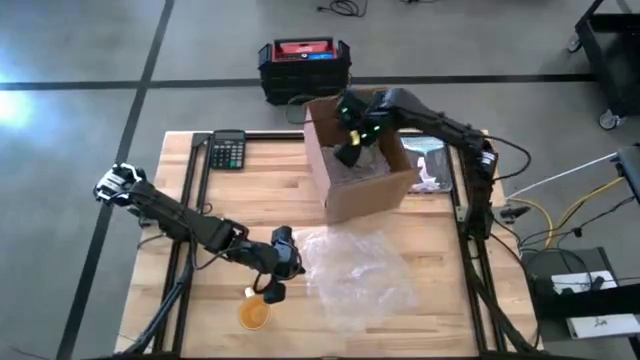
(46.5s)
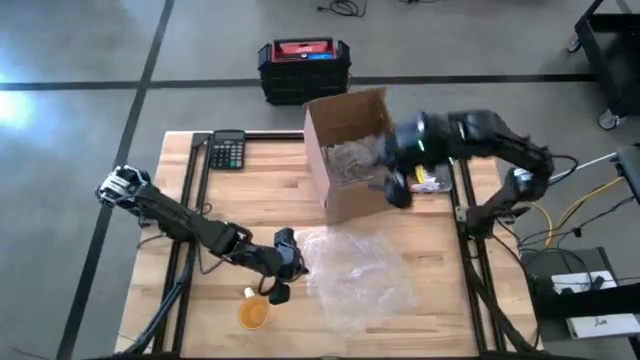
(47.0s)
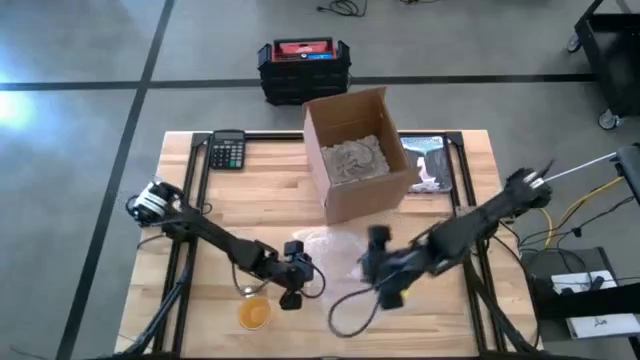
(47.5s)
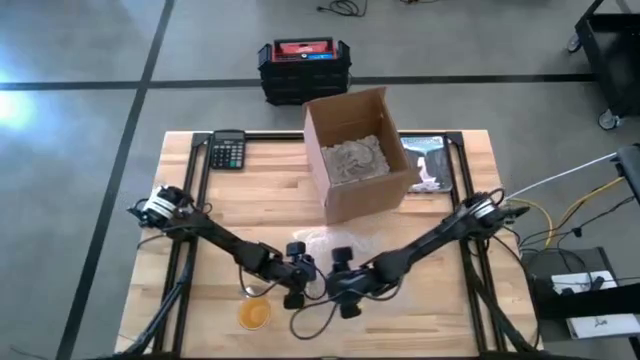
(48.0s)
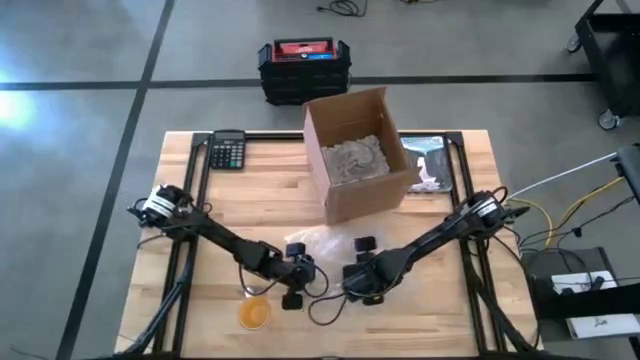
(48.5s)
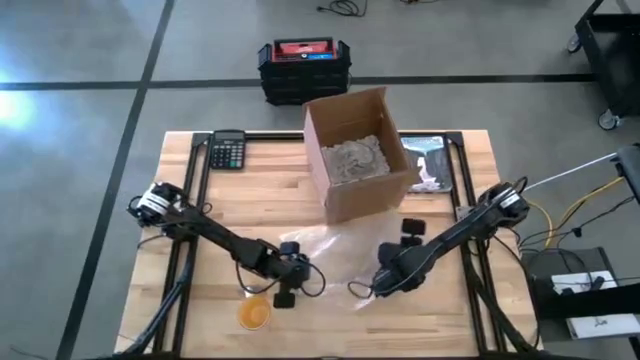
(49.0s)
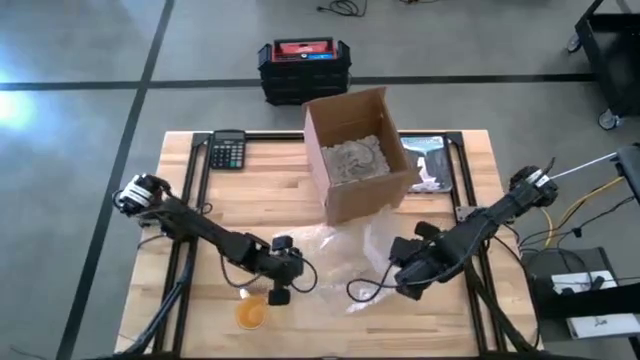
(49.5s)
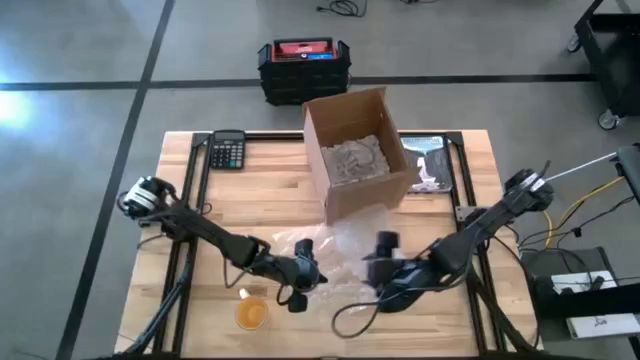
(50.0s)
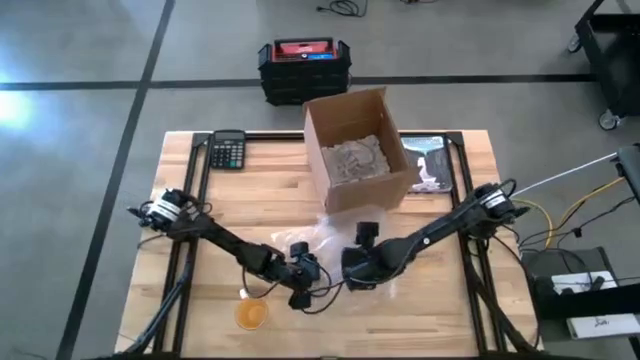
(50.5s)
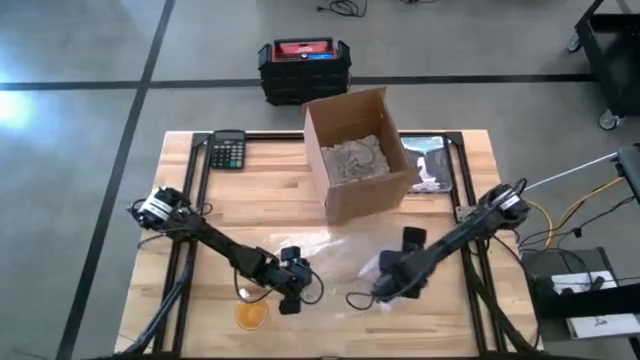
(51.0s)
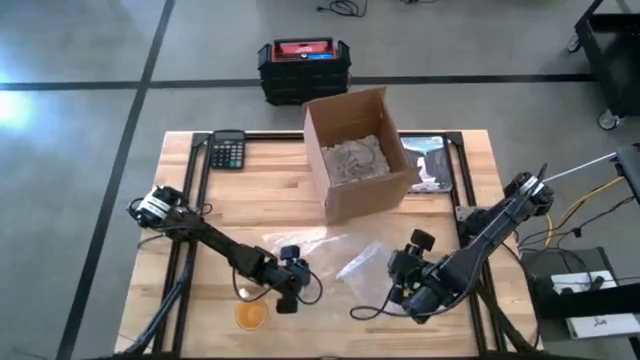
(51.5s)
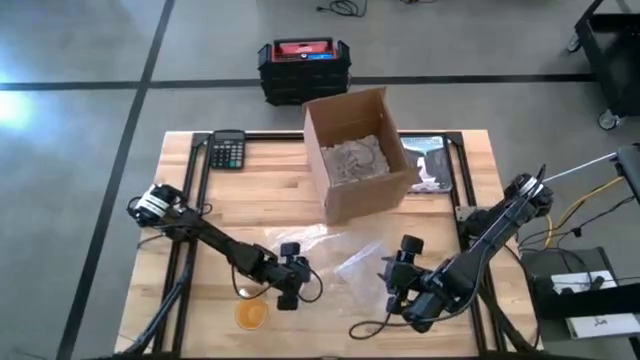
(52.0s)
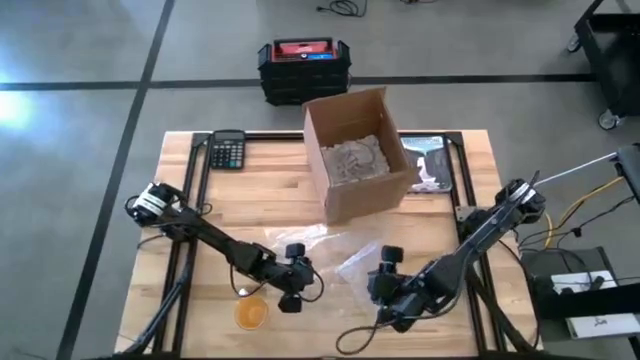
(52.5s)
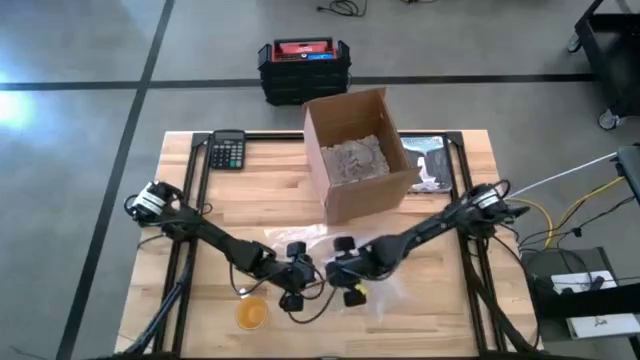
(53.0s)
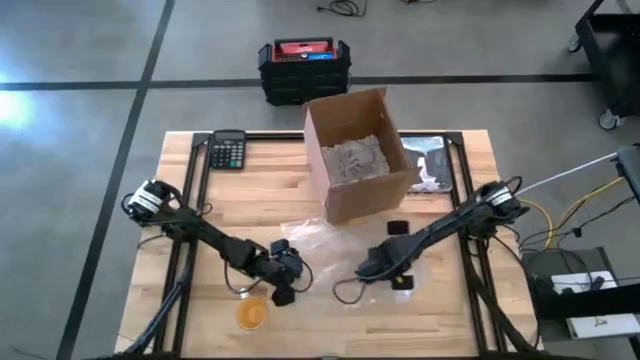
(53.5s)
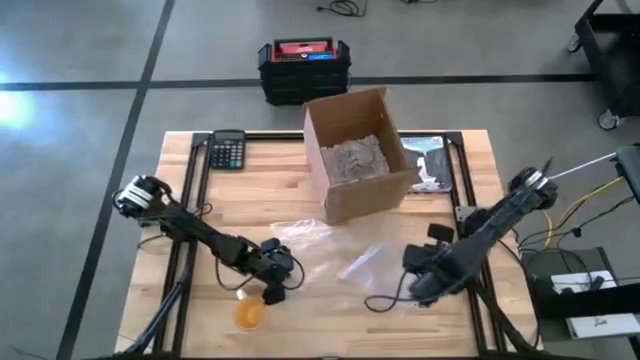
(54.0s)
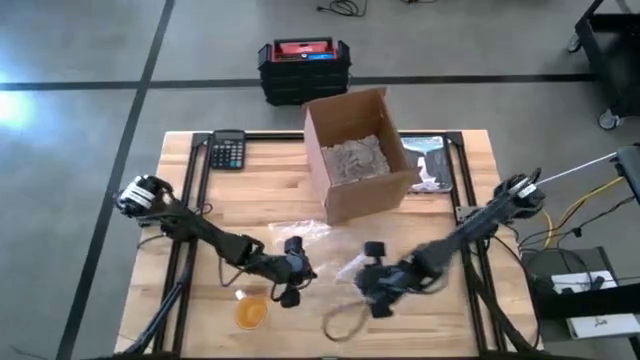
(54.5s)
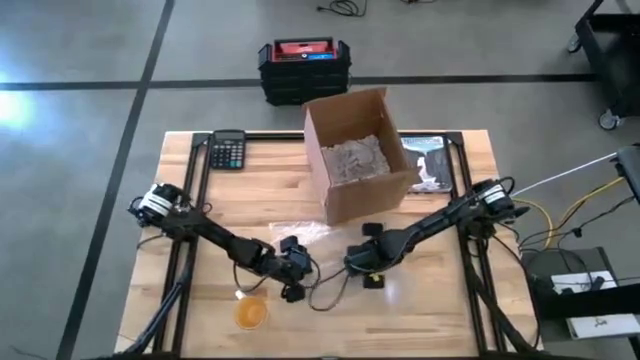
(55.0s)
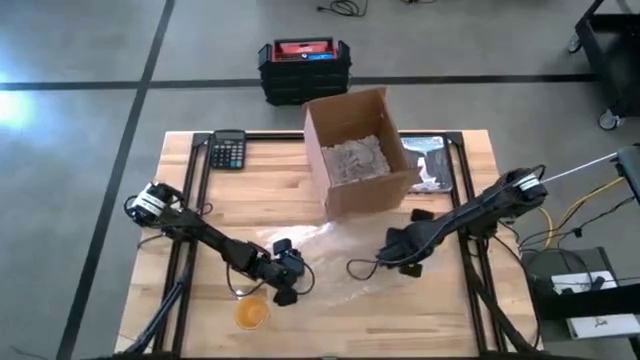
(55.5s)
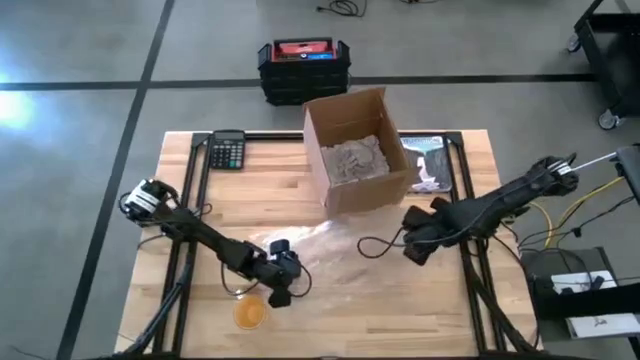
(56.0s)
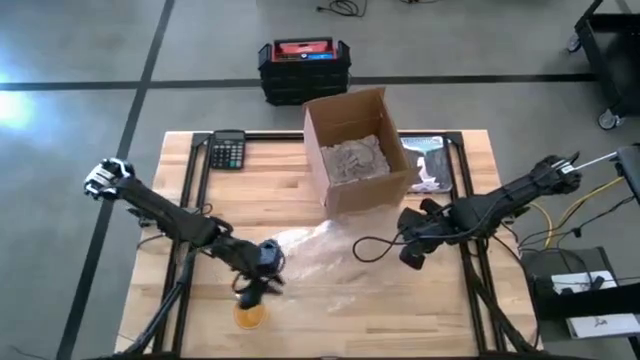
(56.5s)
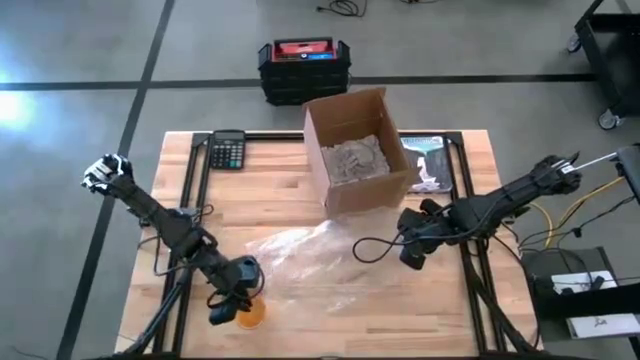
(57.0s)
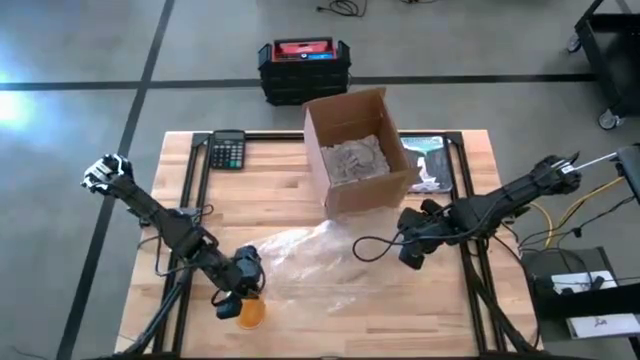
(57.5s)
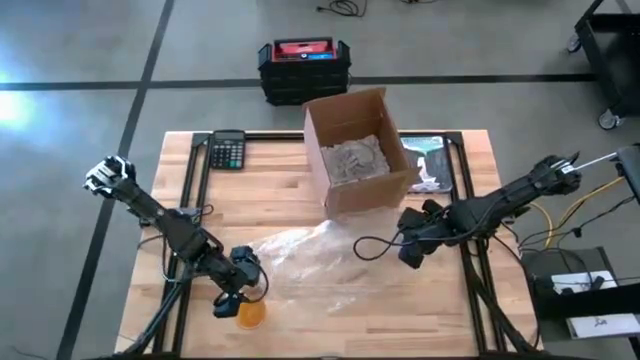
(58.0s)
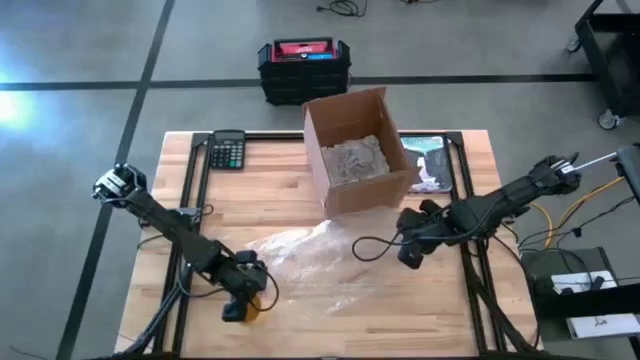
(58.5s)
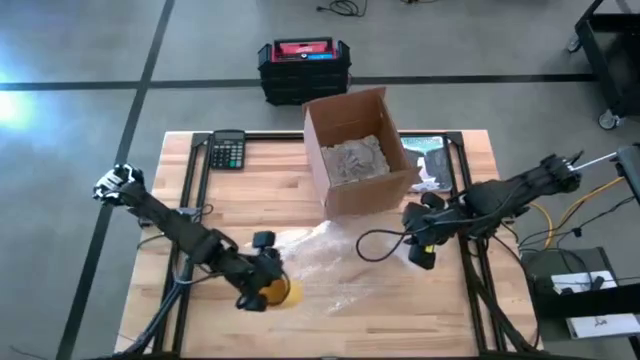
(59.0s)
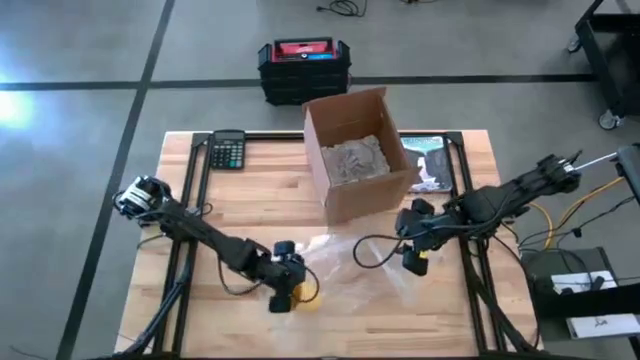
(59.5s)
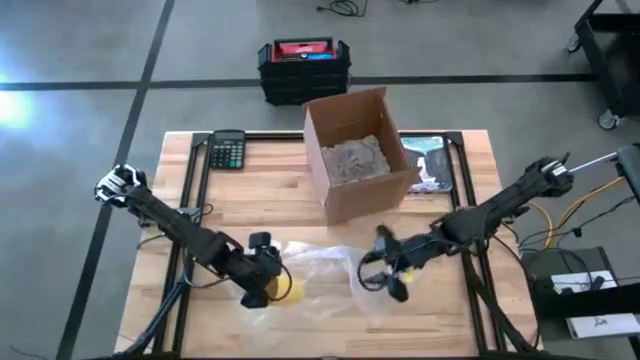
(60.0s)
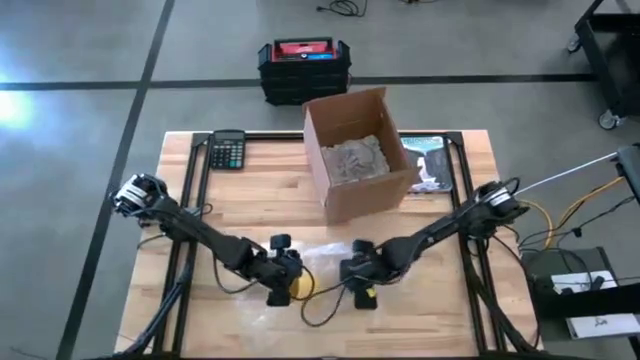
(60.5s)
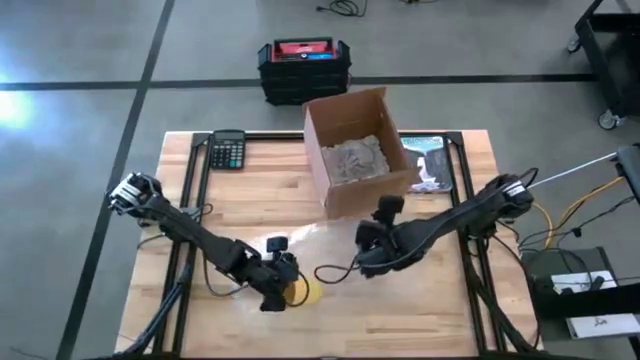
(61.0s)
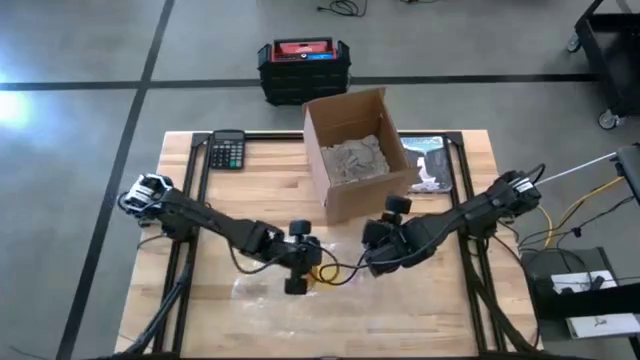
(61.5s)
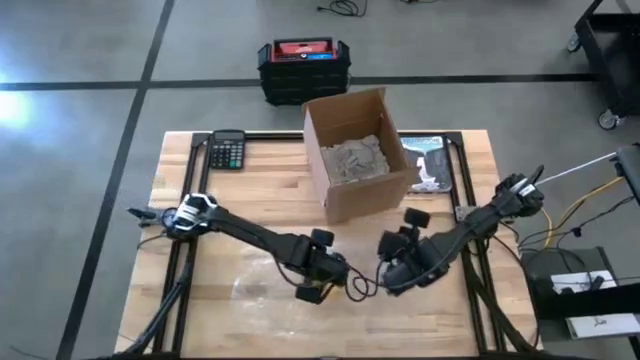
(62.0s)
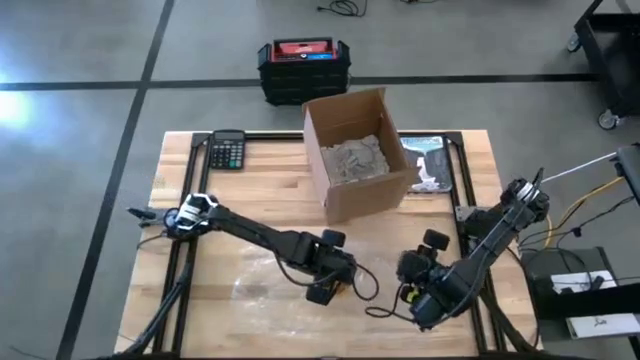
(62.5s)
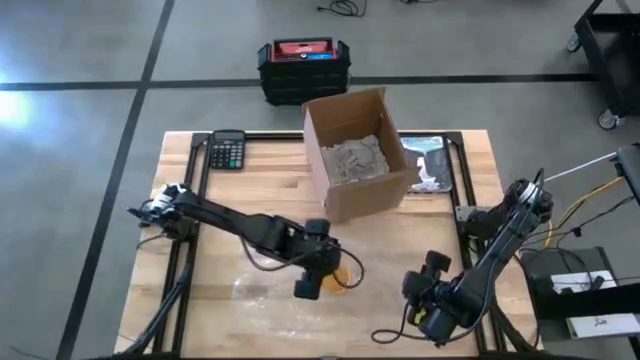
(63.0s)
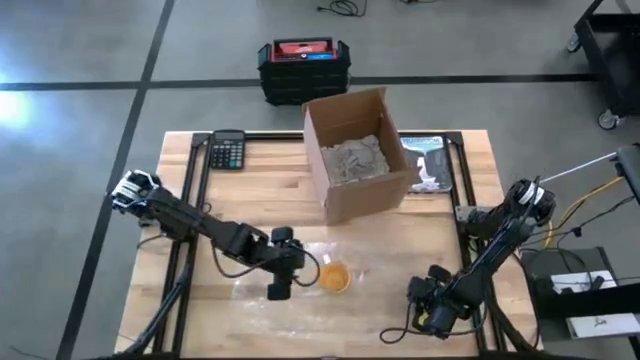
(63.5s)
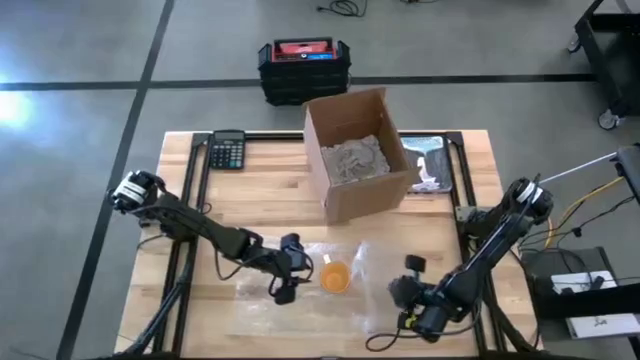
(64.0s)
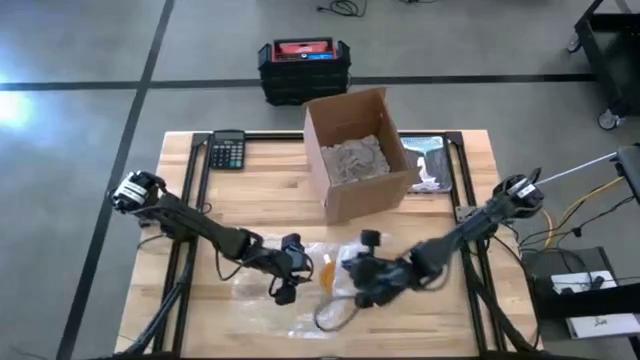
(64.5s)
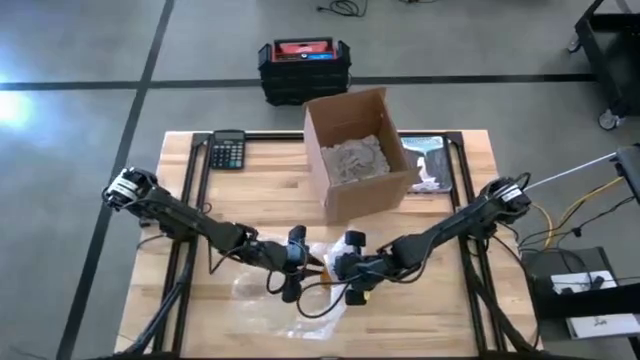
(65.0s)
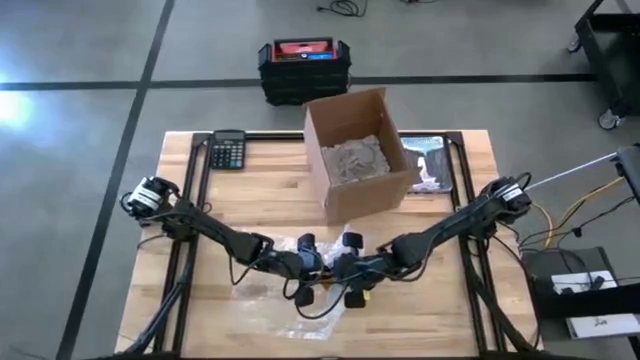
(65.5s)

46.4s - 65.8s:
Task: wrap mug
Wrap the yellow cup in bubble wrap
